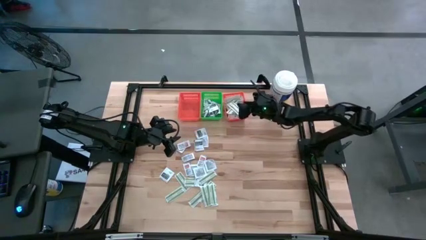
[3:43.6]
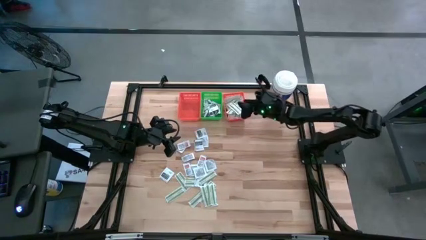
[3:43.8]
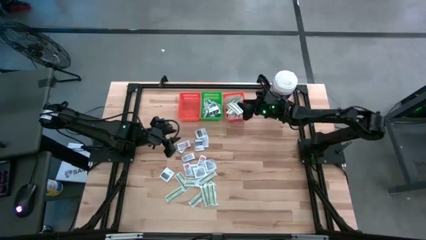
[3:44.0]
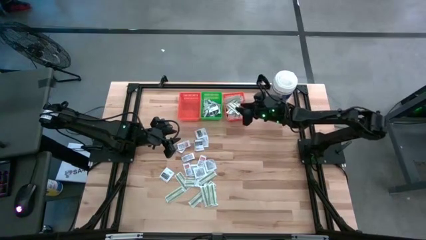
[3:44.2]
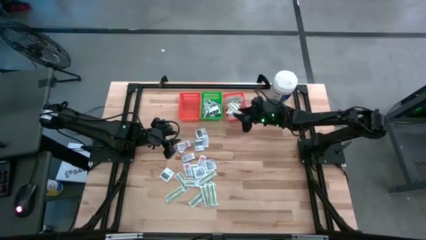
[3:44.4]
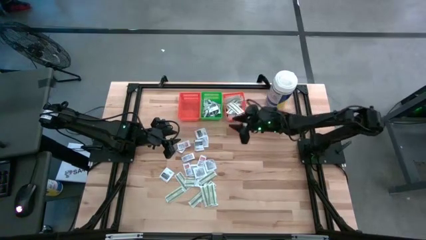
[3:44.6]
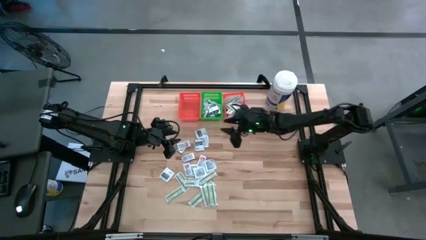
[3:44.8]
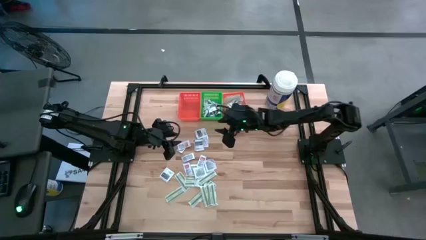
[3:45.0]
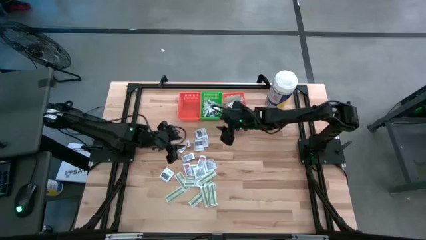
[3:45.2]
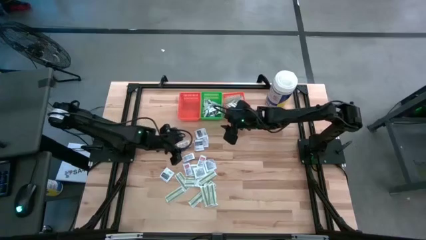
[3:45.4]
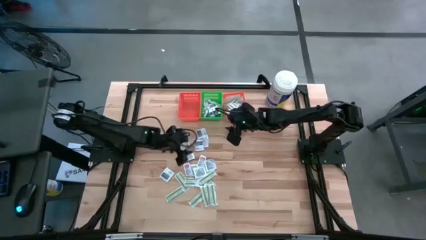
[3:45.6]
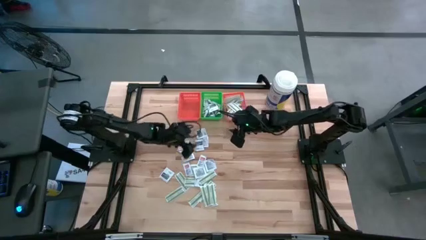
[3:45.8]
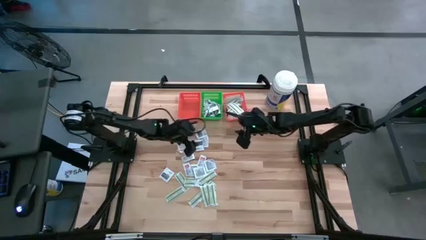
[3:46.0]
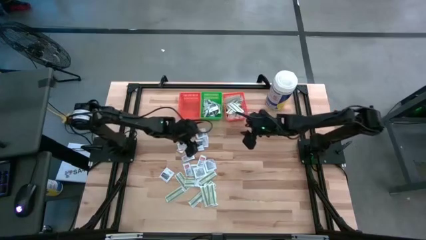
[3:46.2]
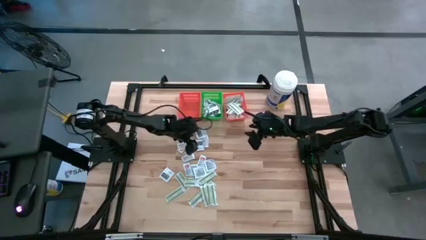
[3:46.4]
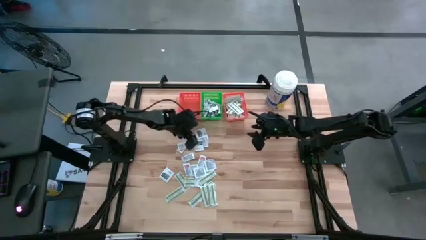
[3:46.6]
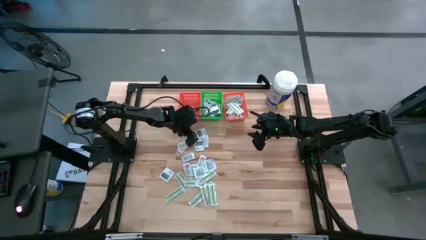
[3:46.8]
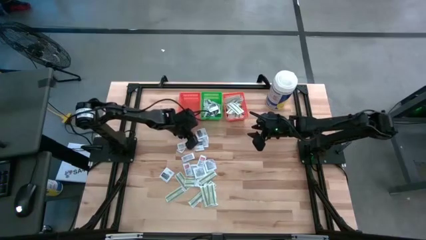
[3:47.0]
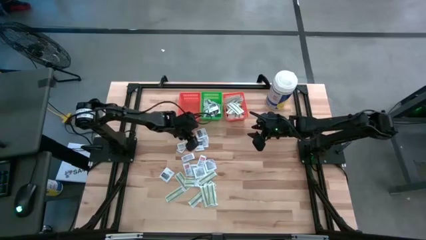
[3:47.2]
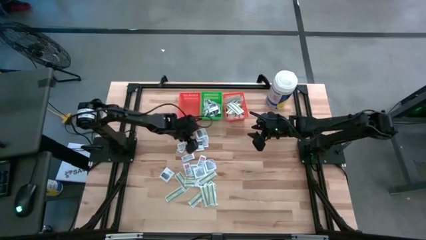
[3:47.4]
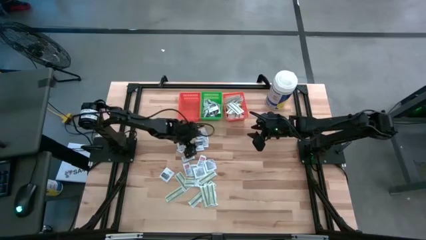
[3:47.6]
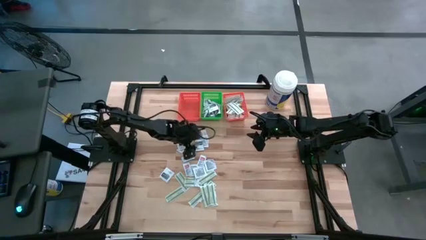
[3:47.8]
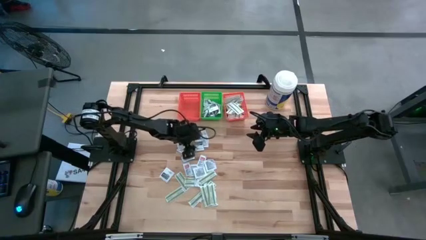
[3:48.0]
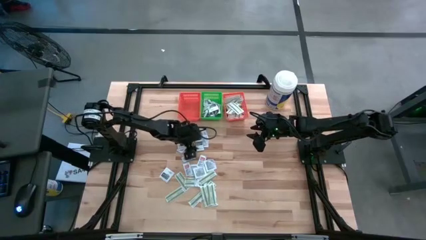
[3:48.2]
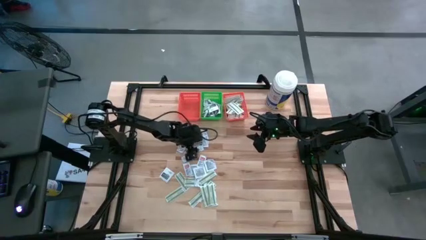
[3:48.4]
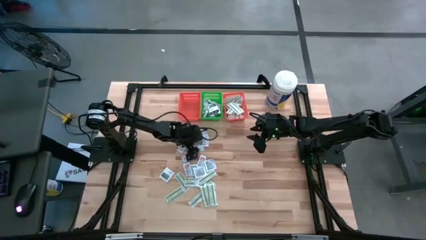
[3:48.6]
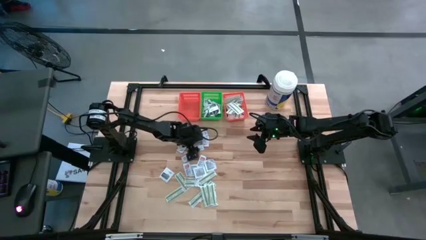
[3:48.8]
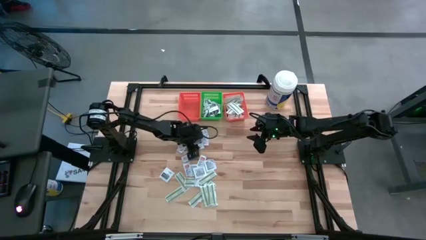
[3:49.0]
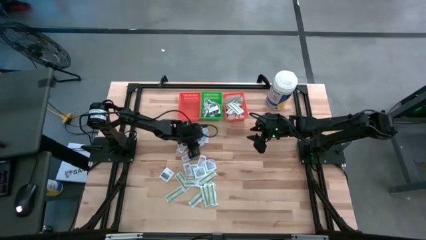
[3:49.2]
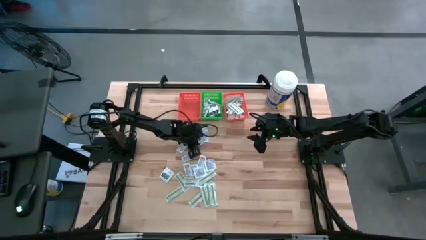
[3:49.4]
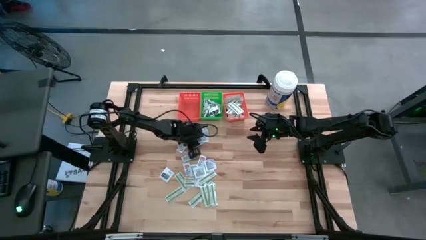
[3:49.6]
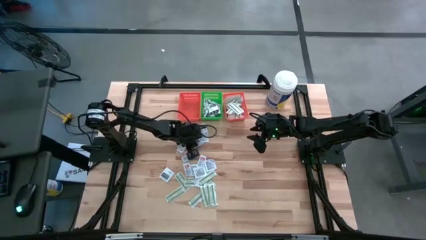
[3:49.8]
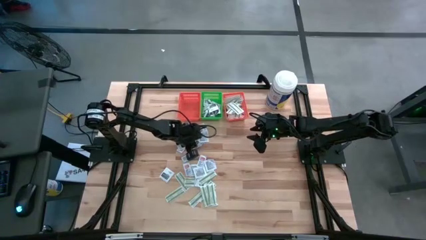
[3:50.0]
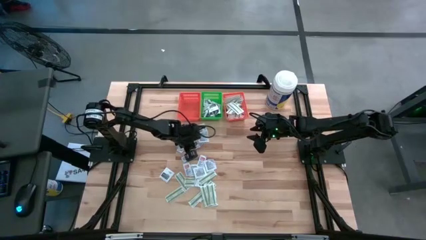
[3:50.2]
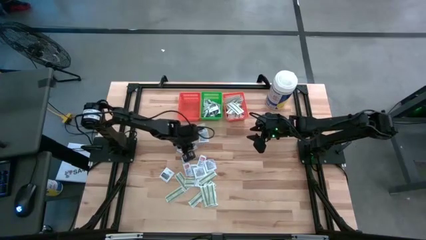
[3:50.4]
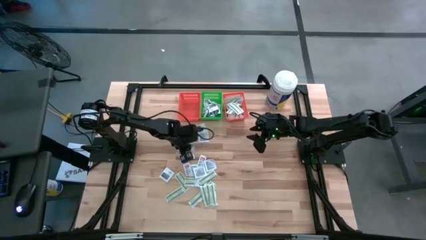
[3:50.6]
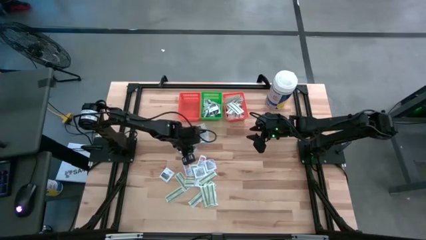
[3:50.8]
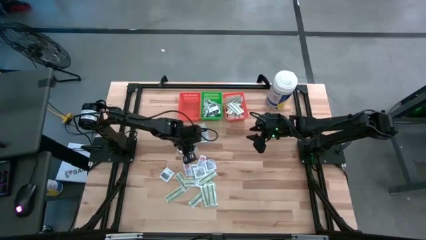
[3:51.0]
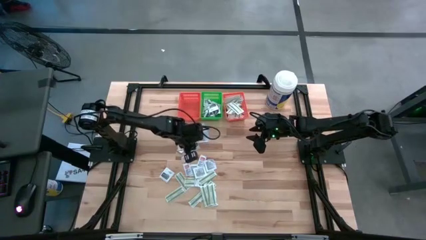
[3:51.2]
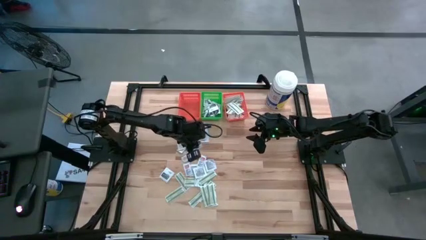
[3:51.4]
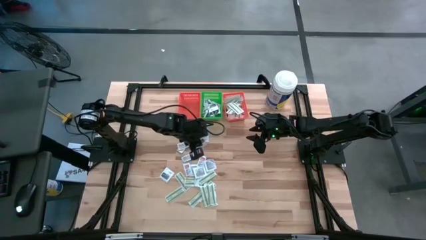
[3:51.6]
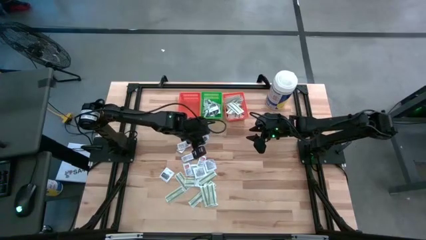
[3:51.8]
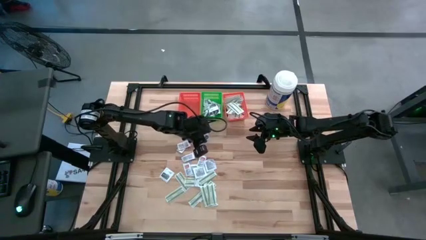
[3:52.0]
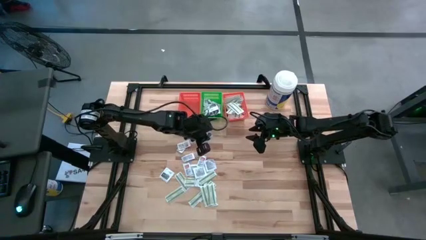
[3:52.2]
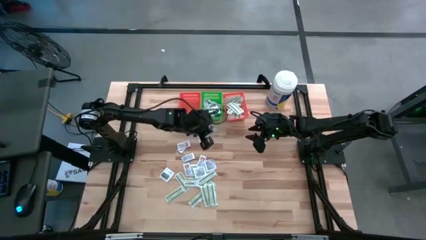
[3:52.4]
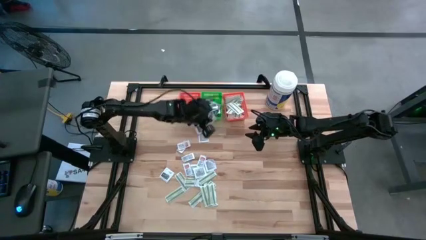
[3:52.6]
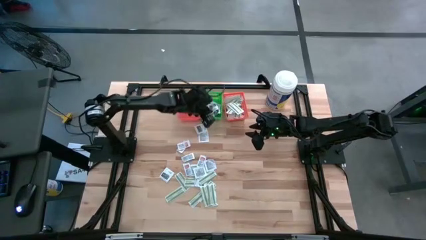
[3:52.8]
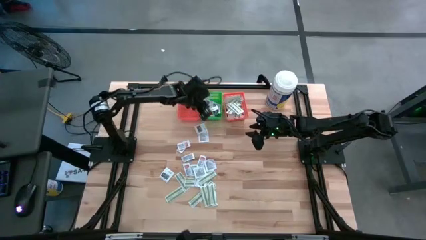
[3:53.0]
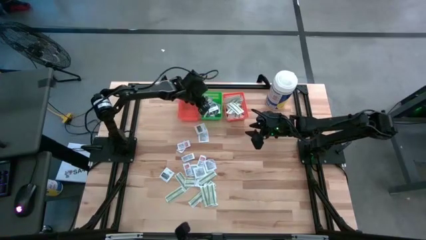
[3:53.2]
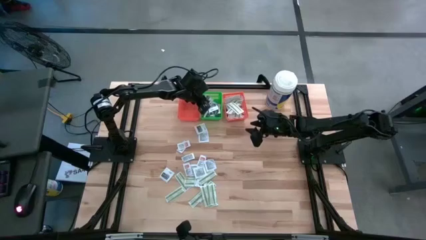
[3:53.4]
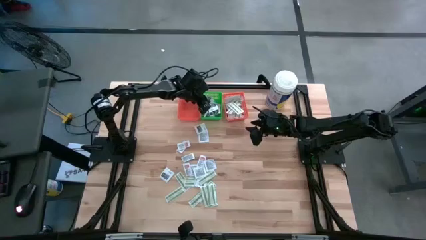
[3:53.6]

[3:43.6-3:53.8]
Task: Pick & Place First Aid Supplies
Put the towelette pack into the green bin

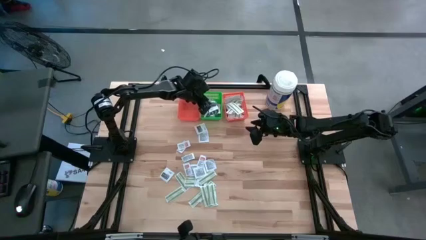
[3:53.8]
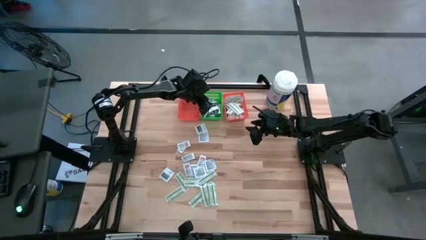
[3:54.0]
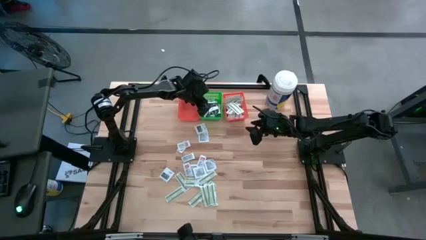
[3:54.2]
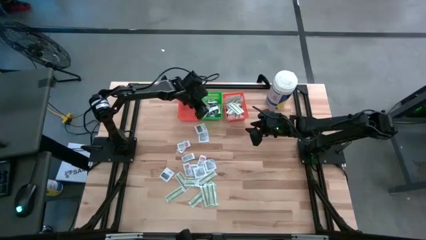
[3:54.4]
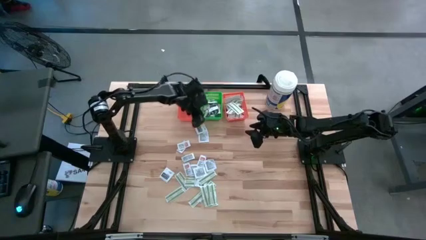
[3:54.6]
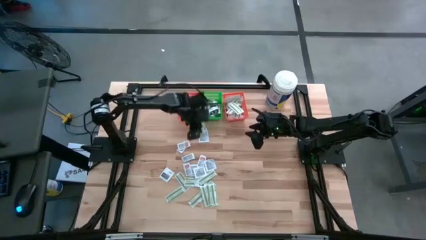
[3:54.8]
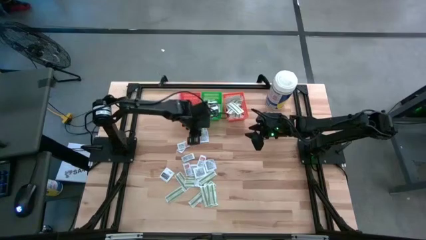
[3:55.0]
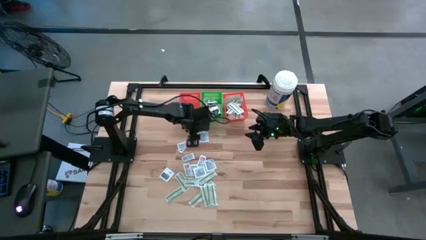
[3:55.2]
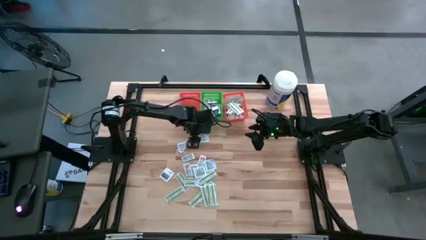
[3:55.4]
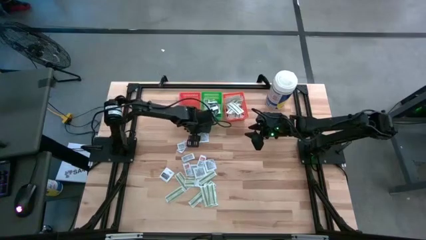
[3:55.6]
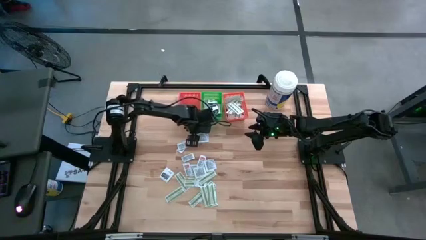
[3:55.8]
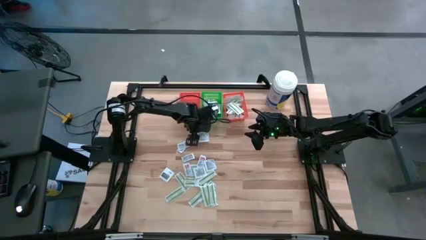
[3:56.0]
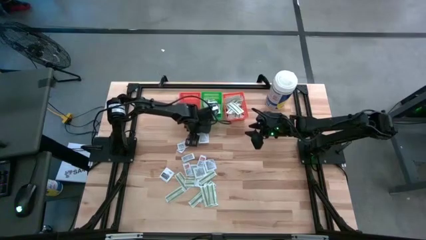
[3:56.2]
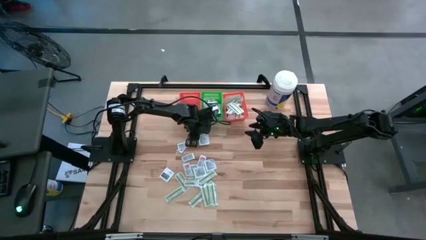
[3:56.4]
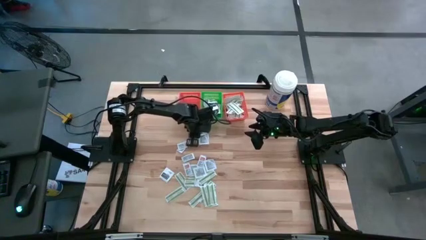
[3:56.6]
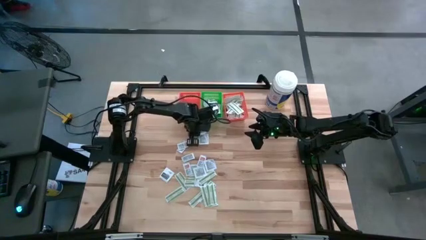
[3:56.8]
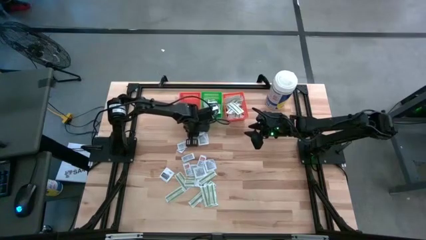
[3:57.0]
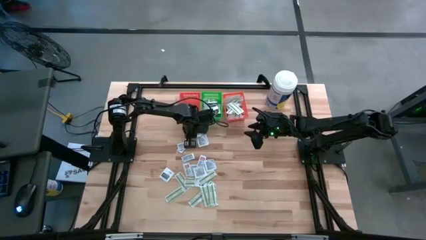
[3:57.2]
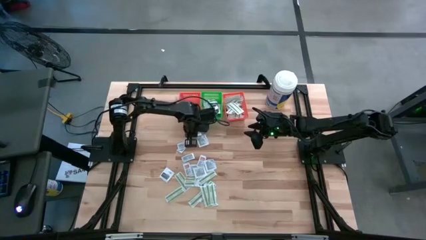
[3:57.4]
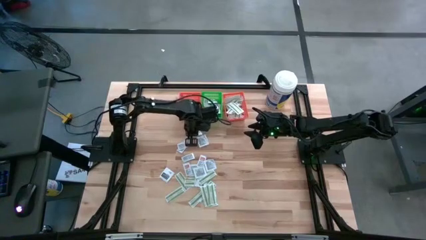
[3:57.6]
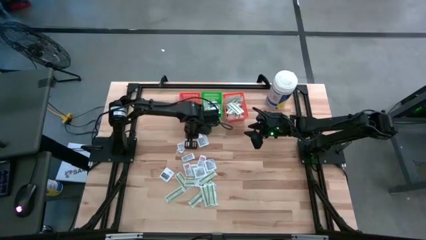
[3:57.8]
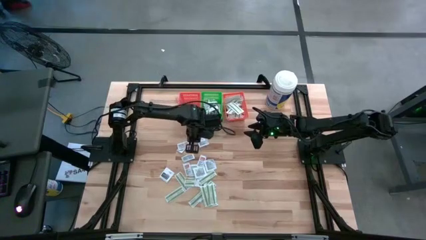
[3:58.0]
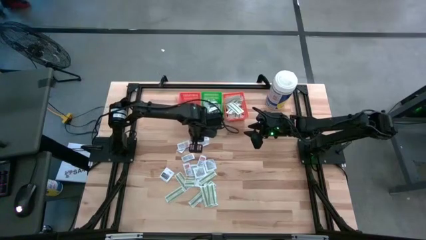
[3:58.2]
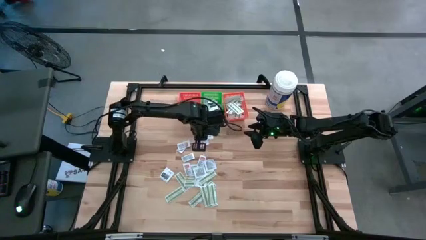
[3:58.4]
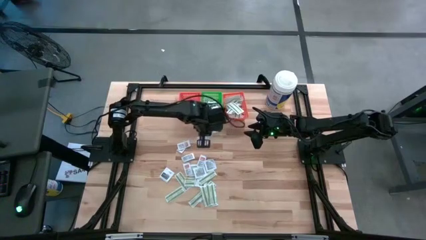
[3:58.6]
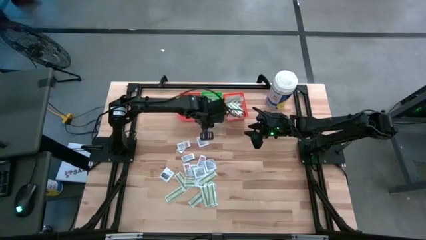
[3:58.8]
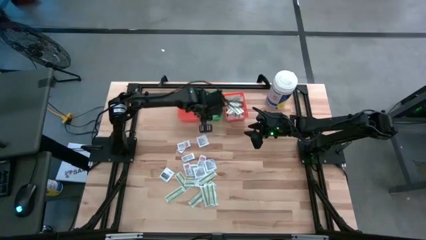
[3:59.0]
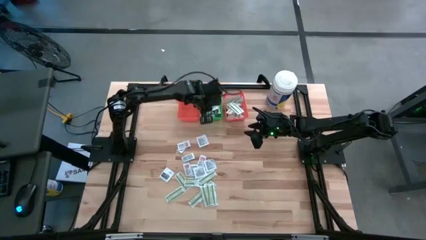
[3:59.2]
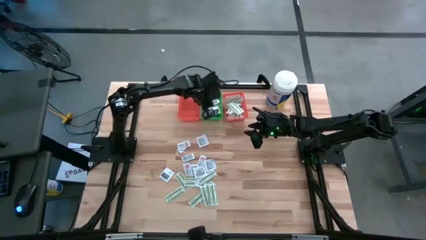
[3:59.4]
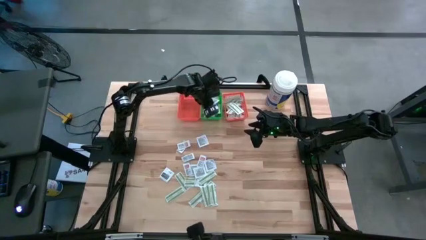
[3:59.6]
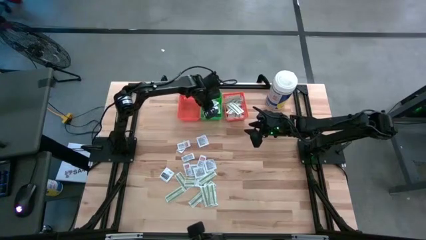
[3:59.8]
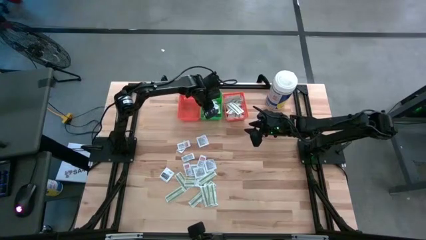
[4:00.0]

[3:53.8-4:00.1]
Put the towelette pack into the green bin
